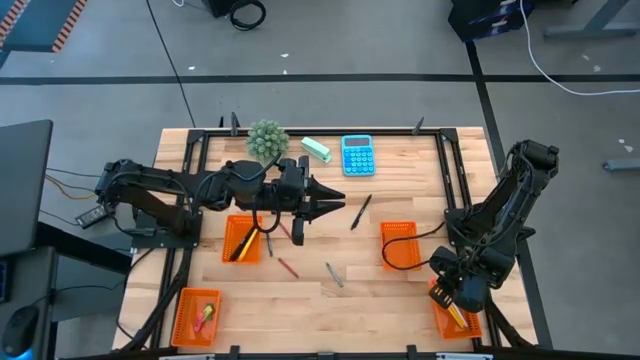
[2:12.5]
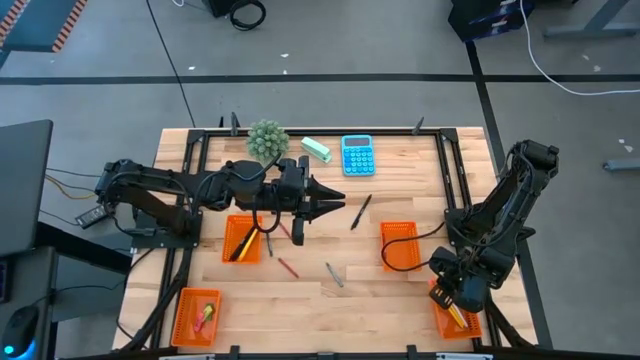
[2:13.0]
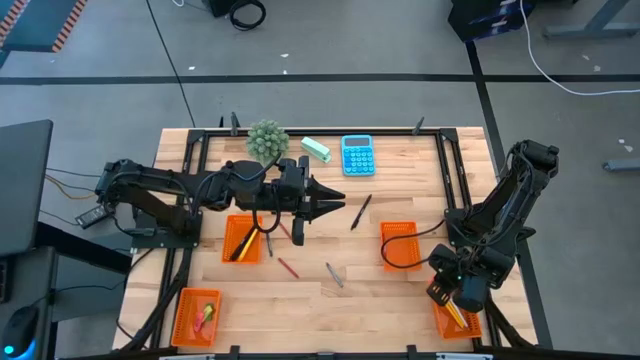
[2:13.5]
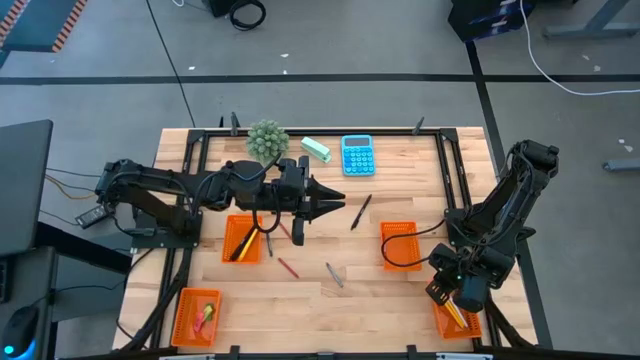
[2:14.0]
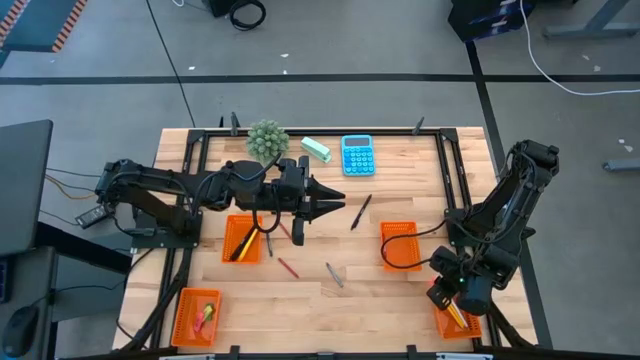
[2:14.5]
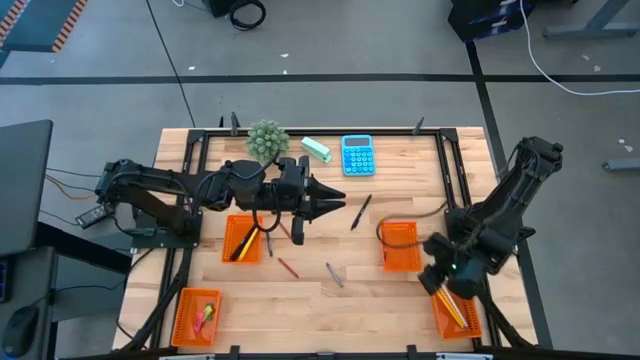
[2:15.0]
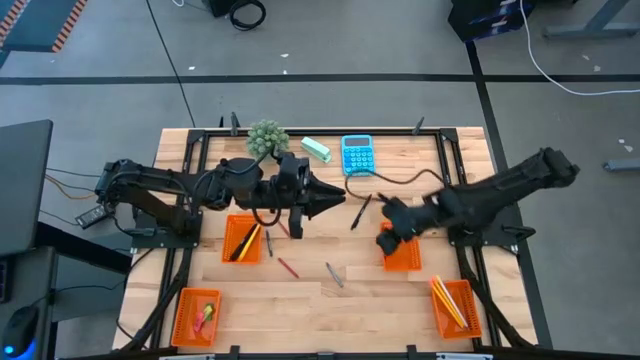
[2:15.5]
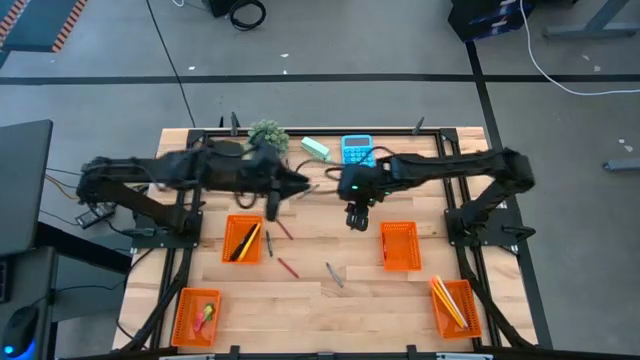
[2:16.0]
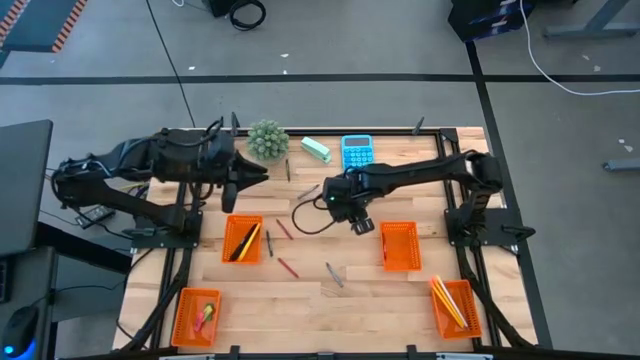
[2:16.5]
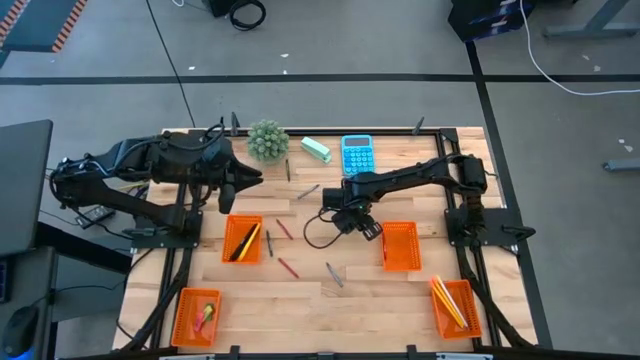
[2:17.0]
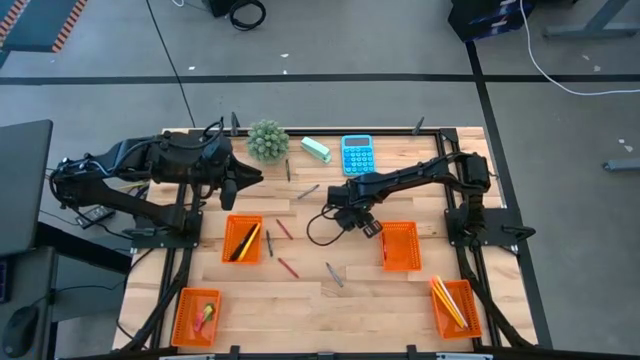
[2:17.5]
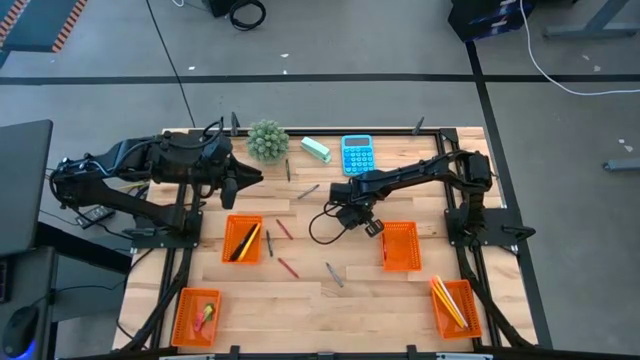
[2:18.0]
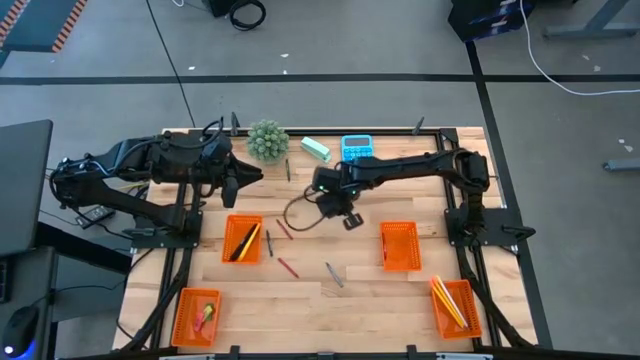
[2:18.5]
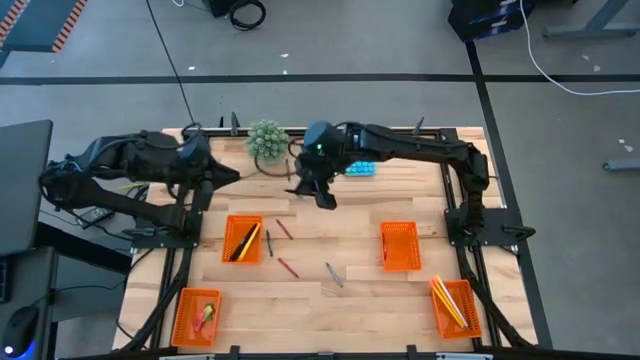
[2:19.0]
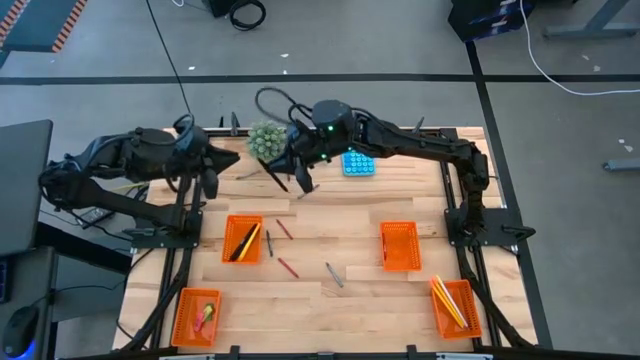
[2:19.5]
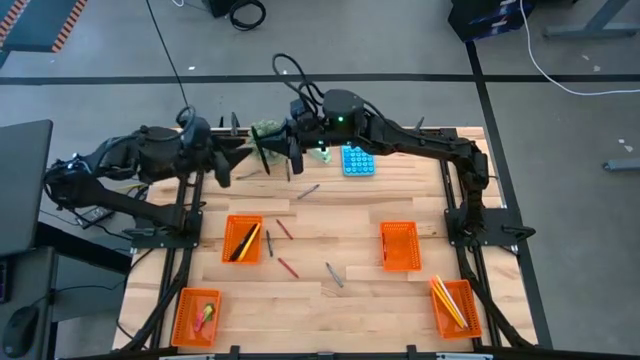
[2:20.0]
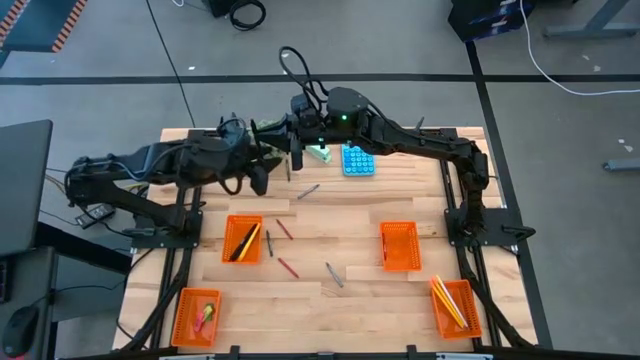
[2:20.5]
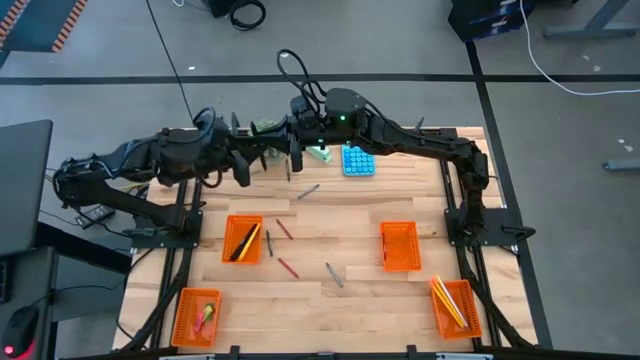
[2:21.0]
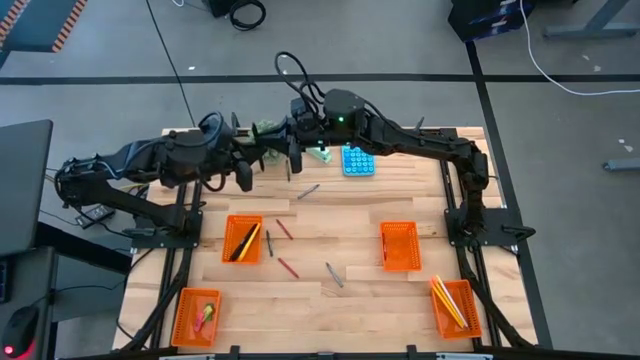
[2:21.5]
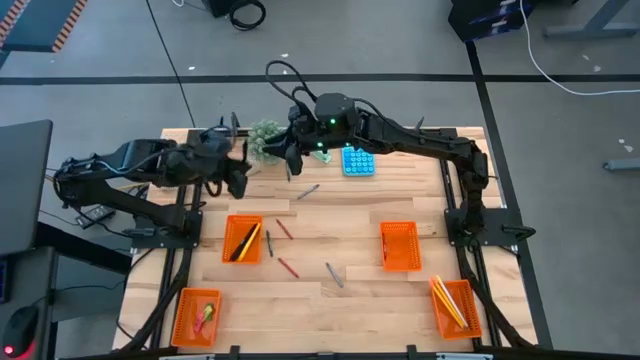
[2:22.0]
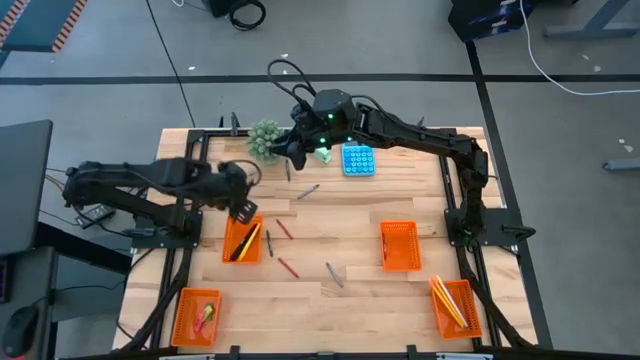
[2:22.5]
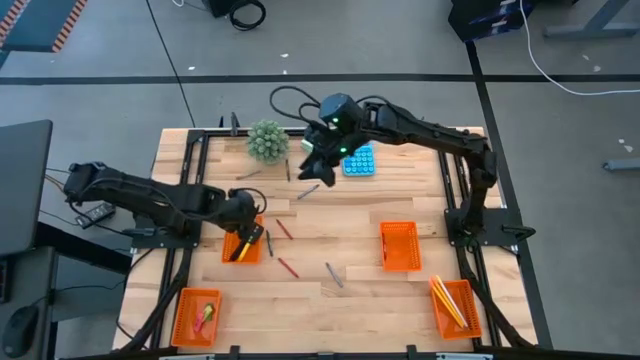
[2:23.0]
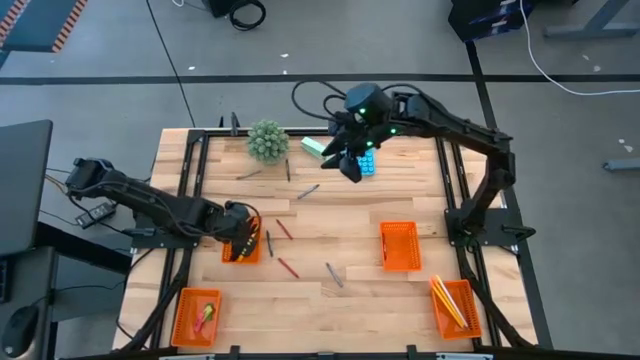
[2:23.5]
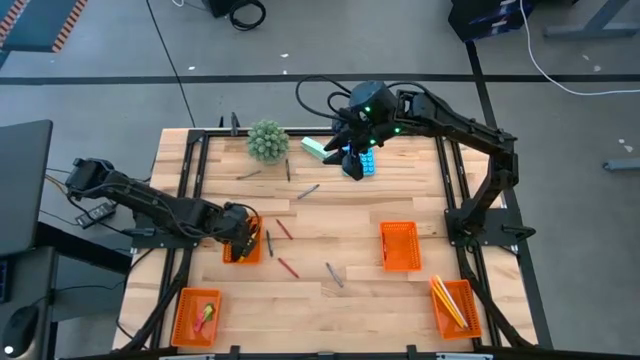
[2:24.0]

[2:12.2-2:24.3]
Task: Sort crayons/erasers/pens/pencils in bins
Put the black pen into the top left orange basket

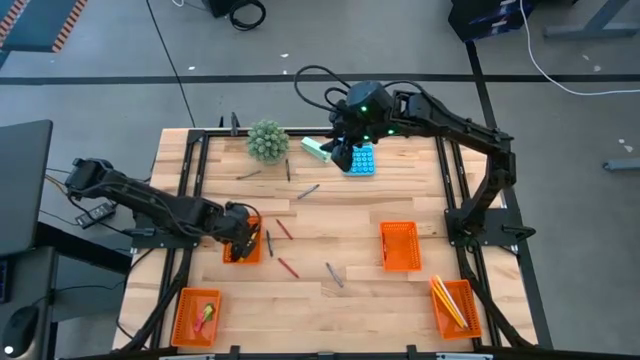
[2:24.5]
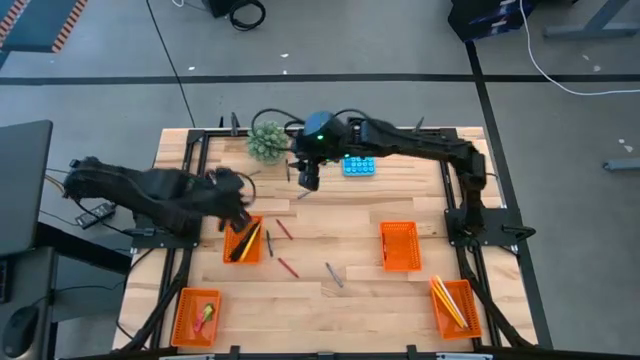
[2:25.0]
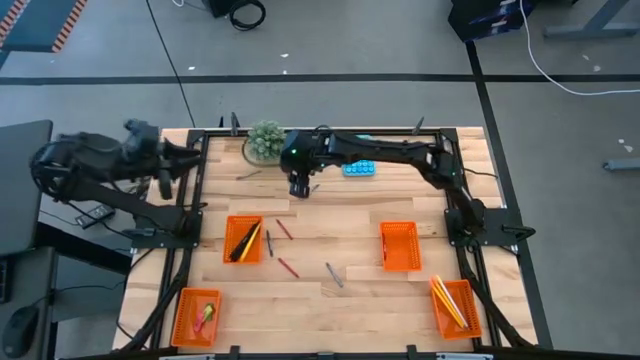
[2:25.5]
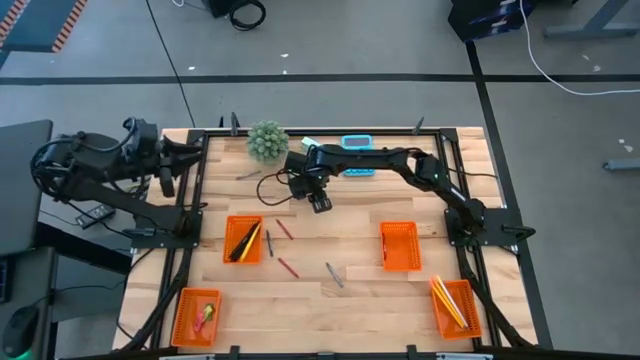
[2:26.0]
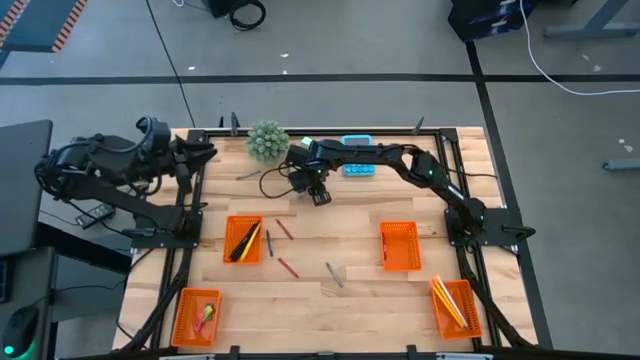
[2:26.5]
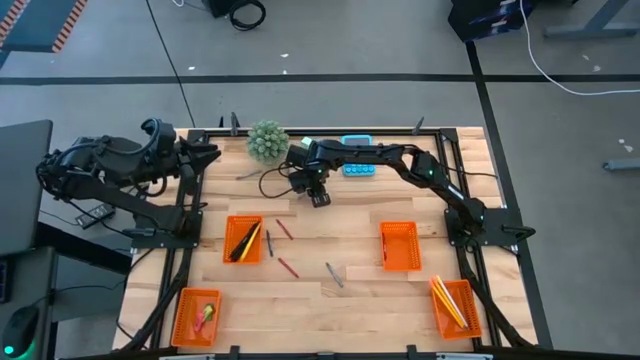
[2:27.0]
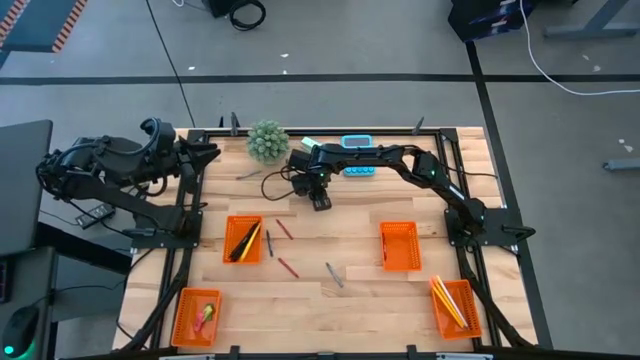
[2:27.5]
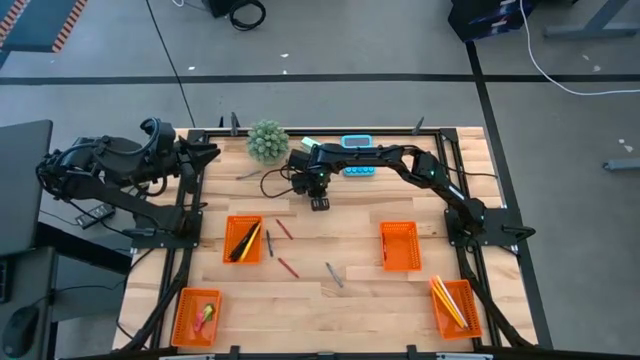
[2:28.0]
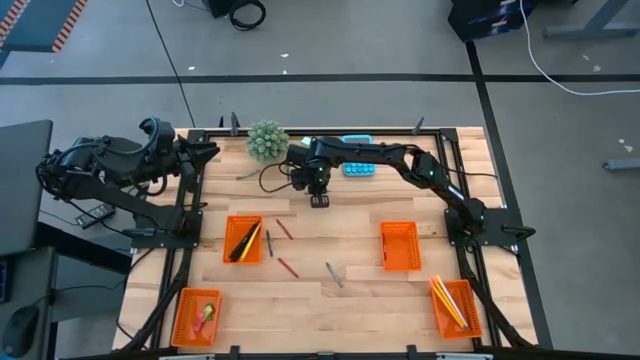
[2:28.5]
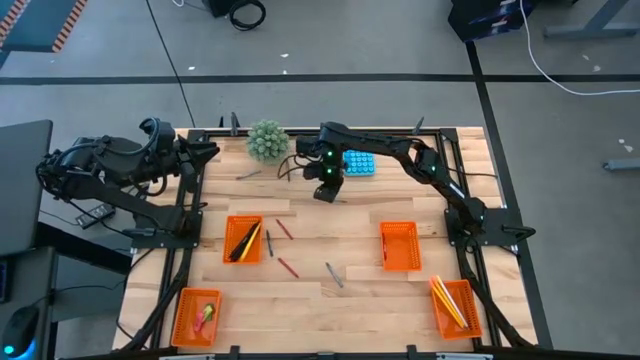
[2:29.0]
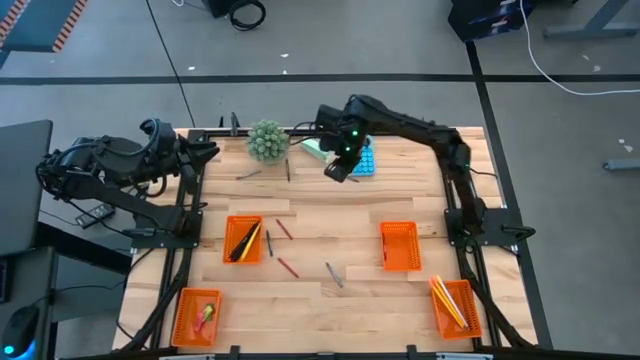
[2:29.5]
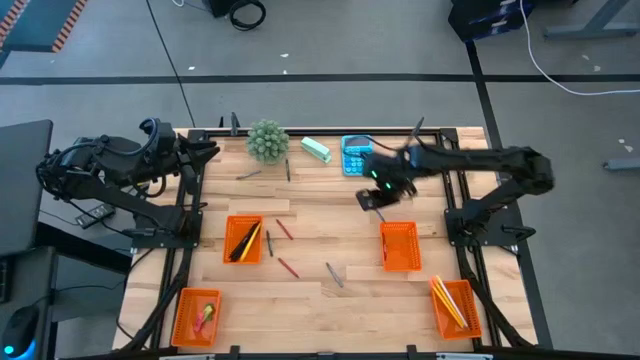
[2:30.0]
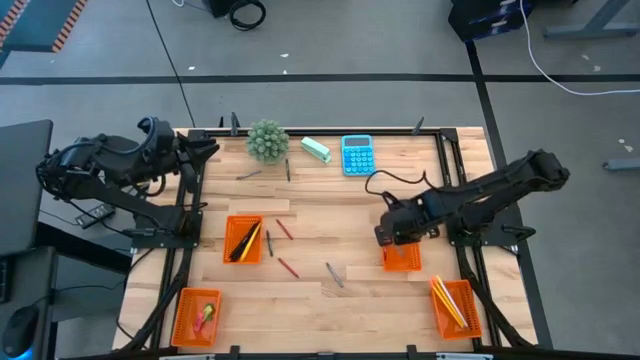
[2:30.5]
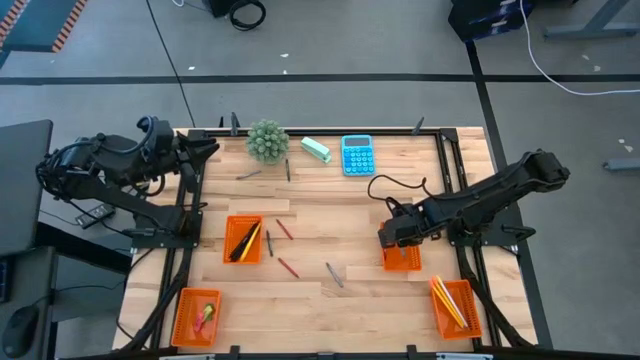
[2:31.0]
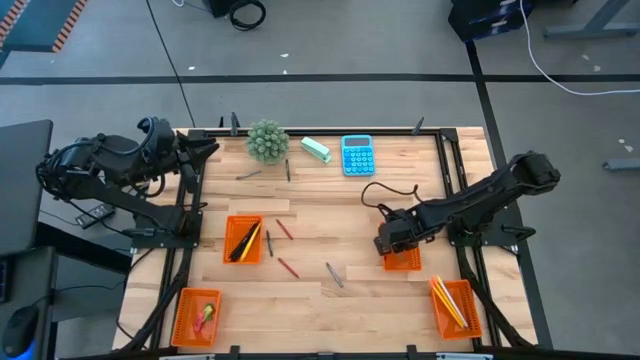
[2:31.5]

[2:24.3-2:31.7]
Put the middle gray crayon into the top right orange basket

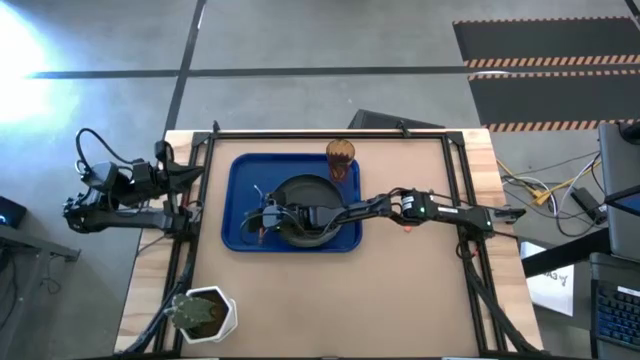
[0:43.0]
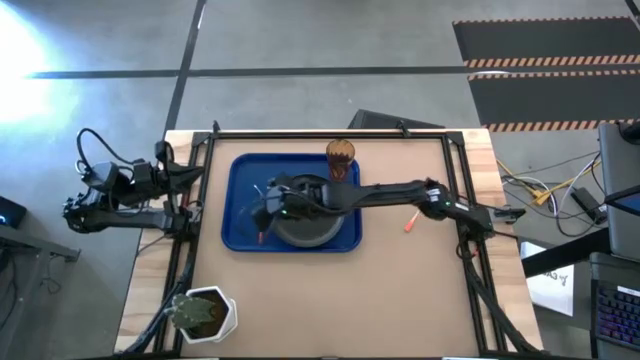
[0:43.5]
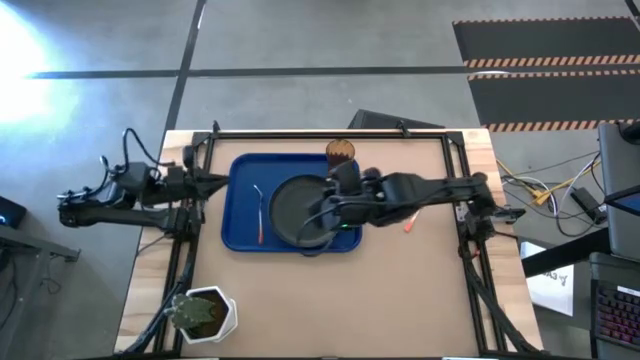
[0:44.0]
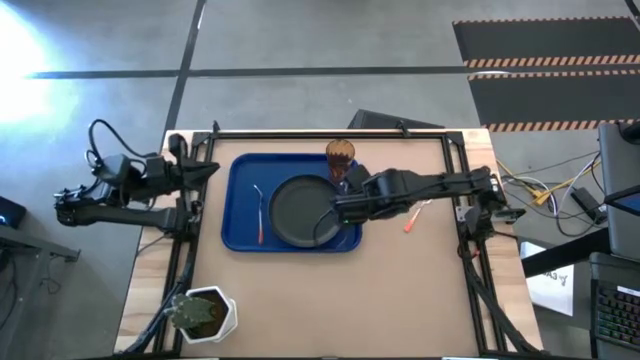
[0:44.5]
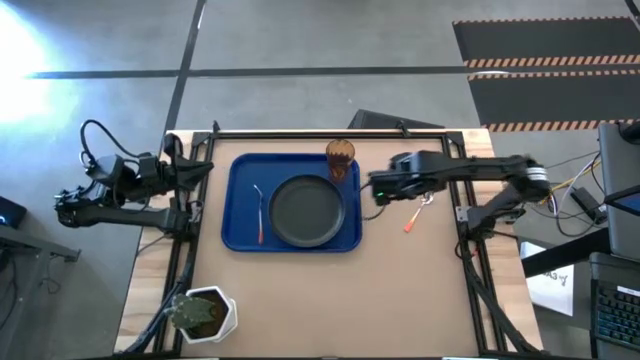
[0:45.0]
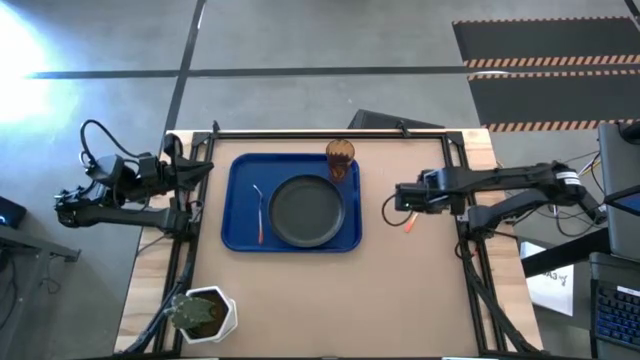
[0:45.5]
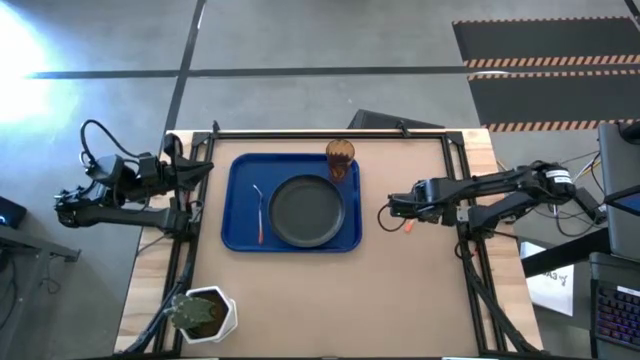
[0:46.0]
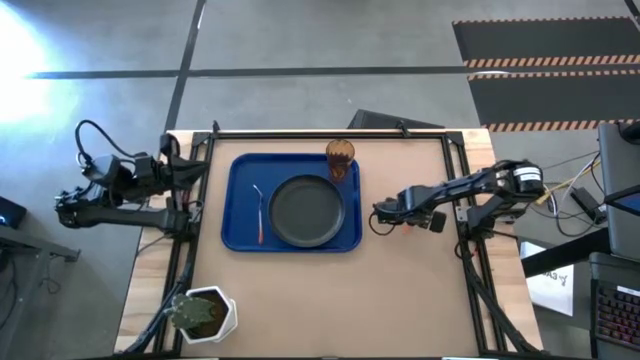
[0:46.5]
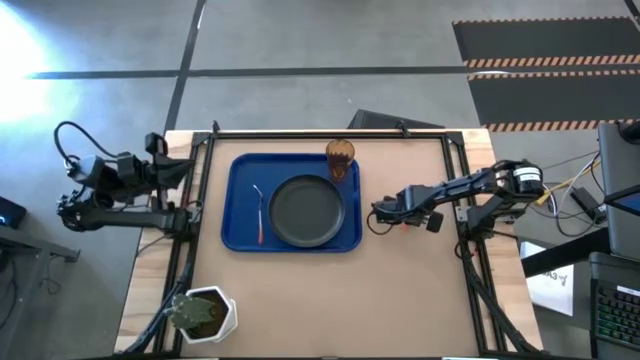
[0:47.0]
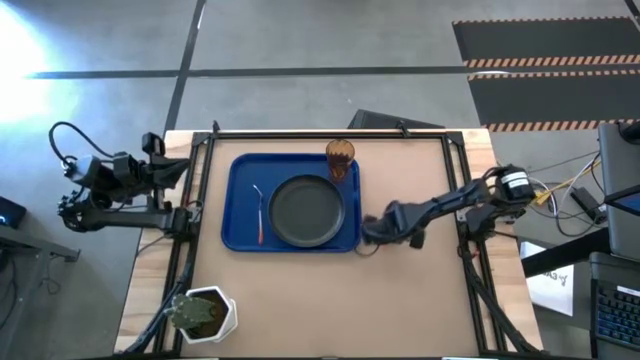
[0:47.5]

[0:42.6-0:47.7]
Task: Pick and place plate/cup/fork/spoon on tray
Move the orange spoon to the bottom left of the table
